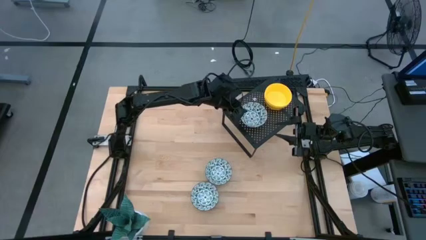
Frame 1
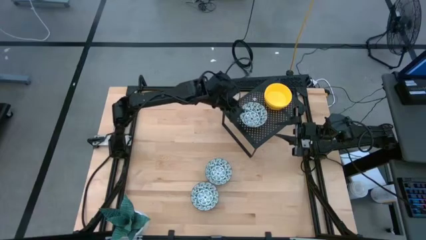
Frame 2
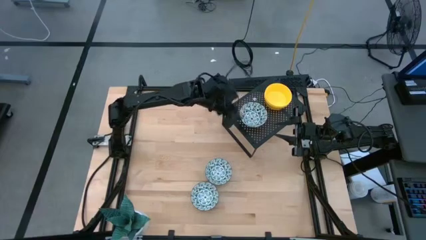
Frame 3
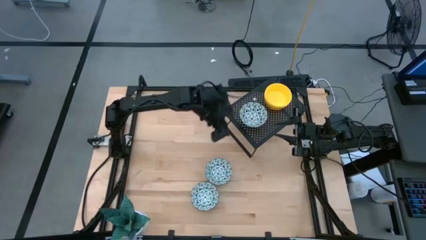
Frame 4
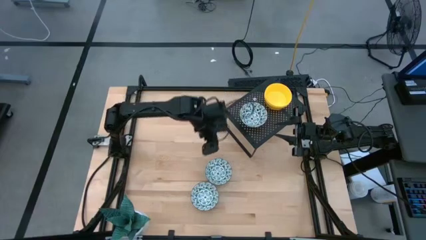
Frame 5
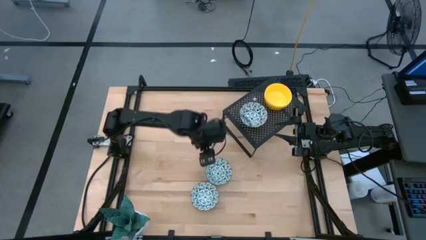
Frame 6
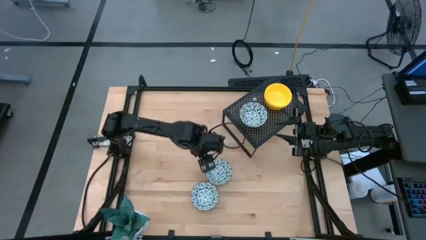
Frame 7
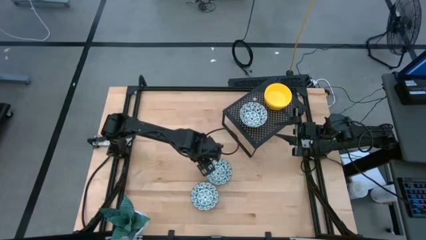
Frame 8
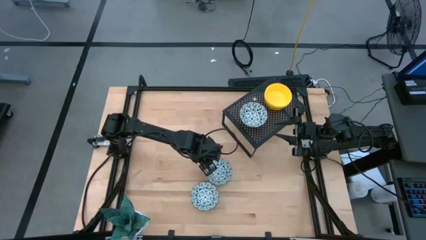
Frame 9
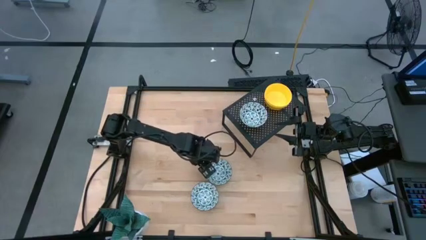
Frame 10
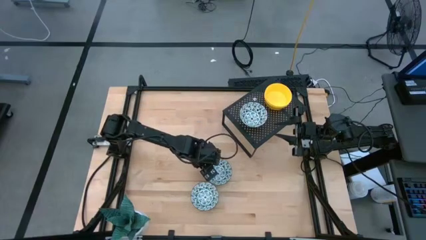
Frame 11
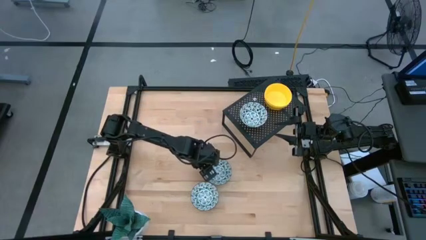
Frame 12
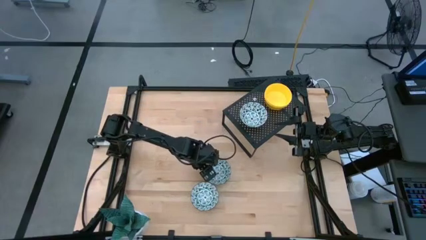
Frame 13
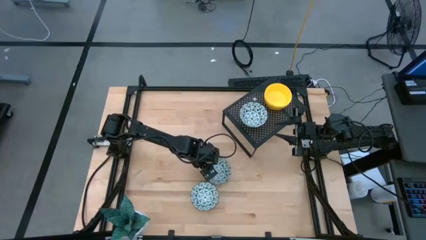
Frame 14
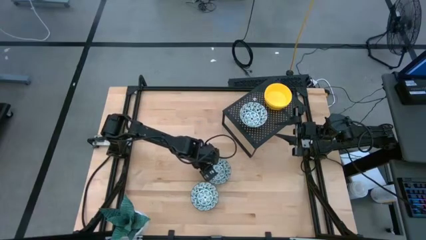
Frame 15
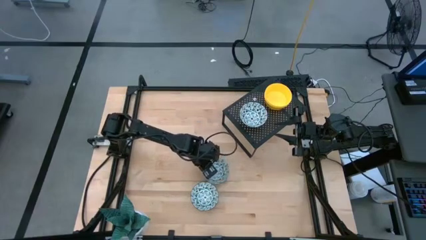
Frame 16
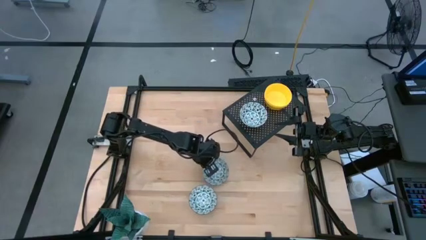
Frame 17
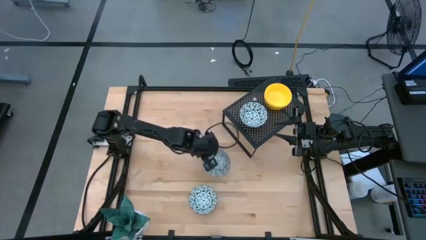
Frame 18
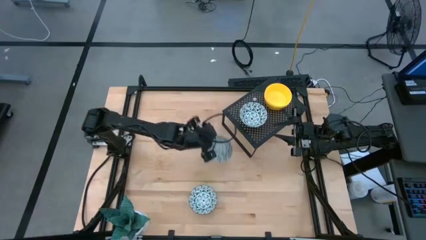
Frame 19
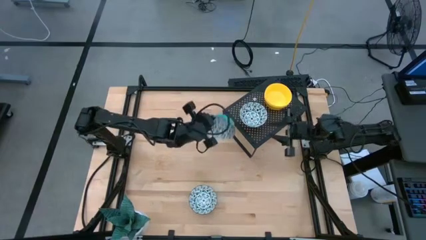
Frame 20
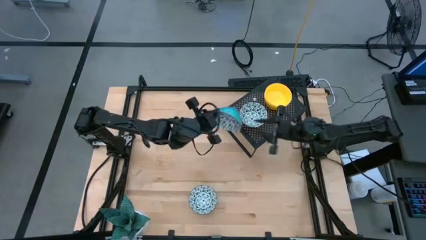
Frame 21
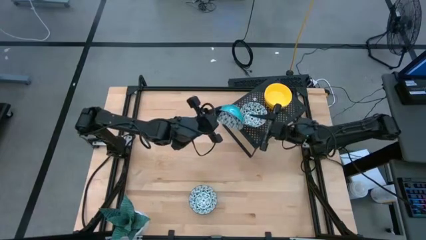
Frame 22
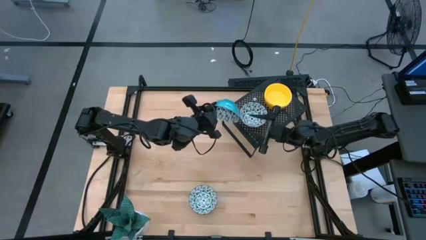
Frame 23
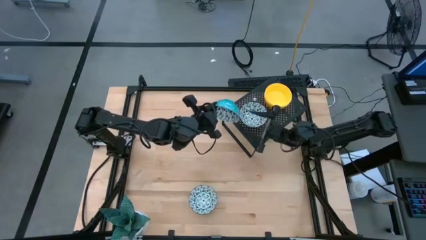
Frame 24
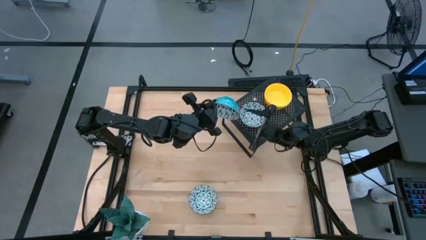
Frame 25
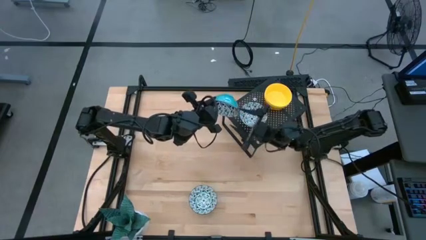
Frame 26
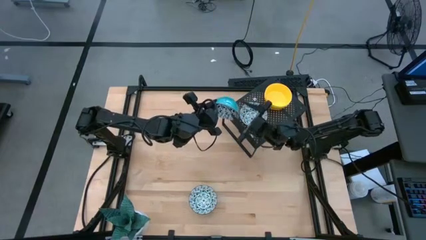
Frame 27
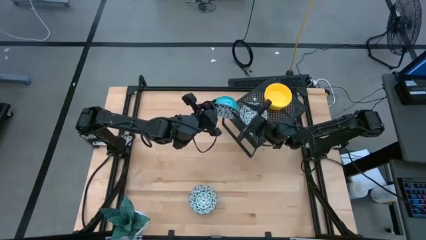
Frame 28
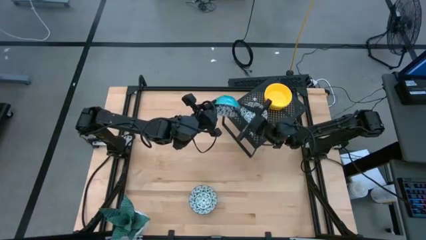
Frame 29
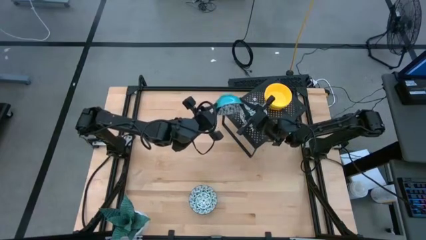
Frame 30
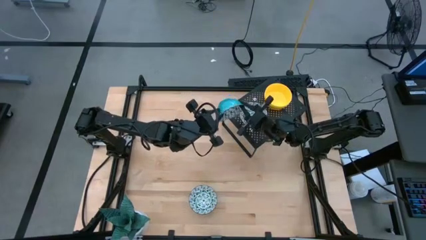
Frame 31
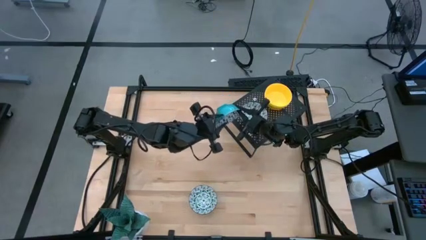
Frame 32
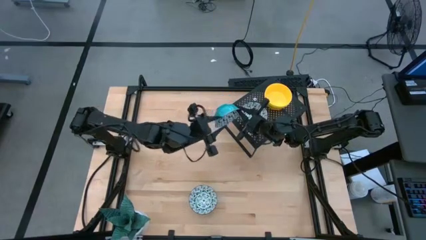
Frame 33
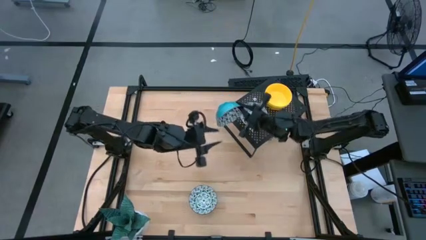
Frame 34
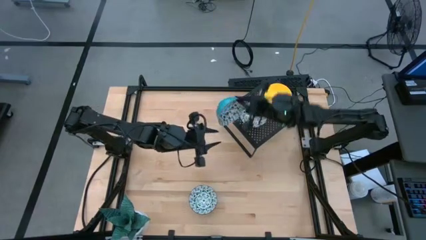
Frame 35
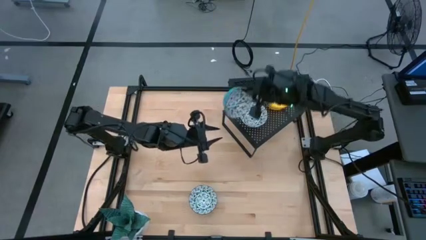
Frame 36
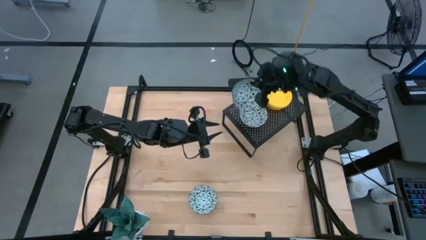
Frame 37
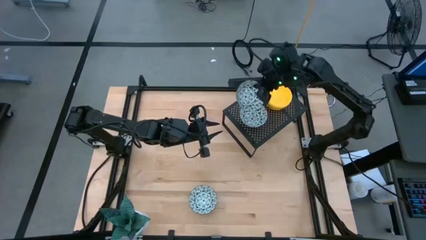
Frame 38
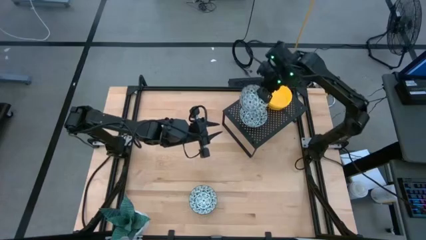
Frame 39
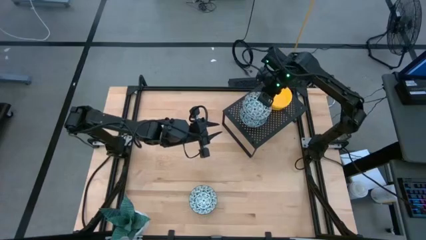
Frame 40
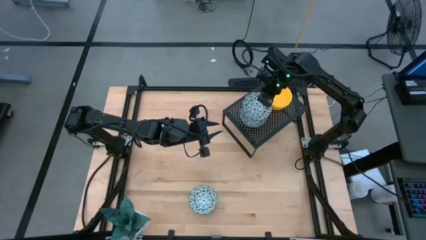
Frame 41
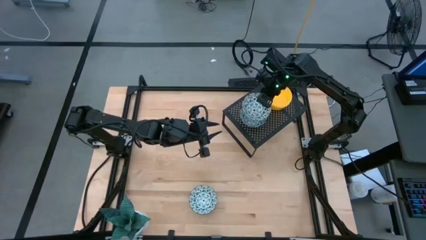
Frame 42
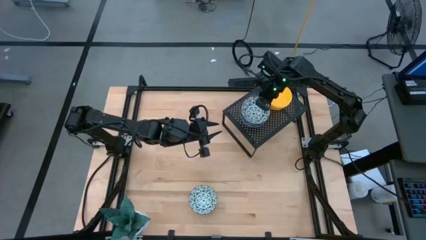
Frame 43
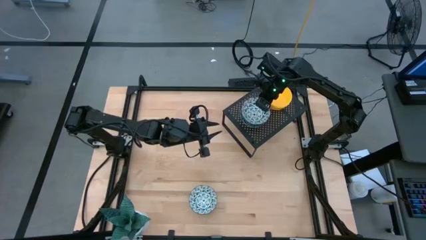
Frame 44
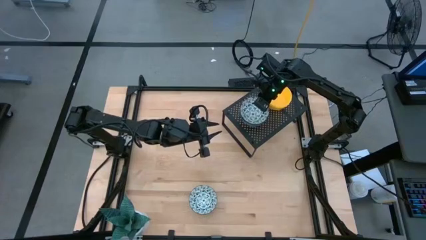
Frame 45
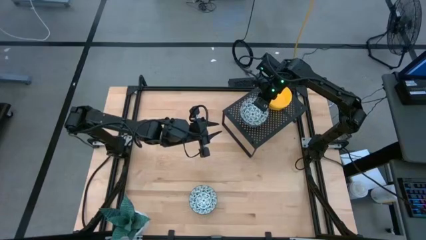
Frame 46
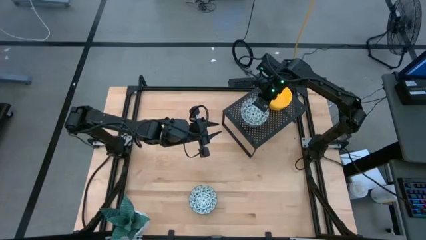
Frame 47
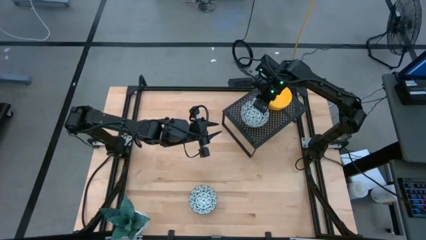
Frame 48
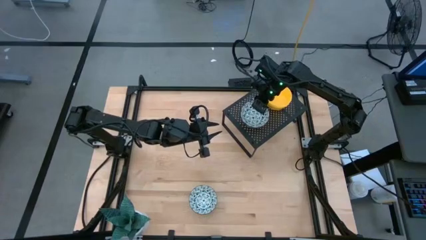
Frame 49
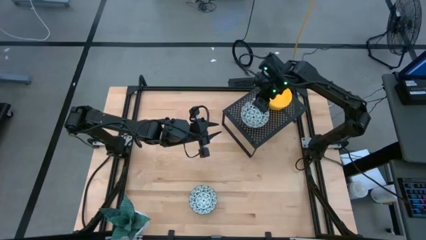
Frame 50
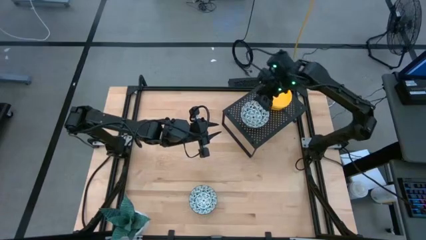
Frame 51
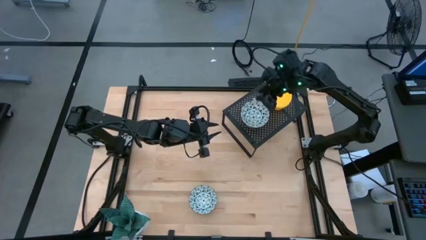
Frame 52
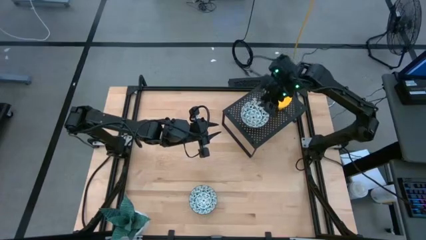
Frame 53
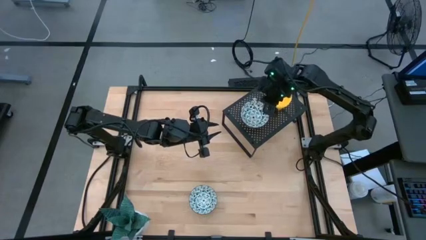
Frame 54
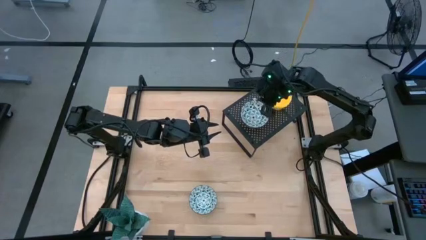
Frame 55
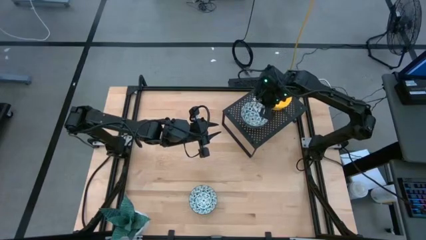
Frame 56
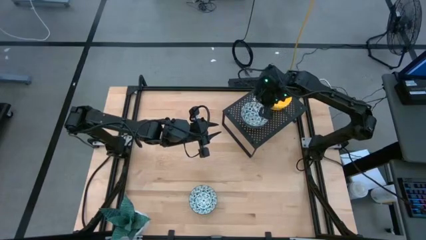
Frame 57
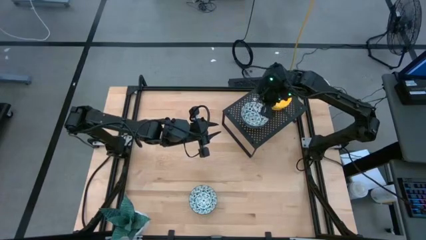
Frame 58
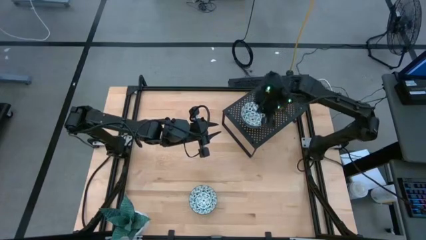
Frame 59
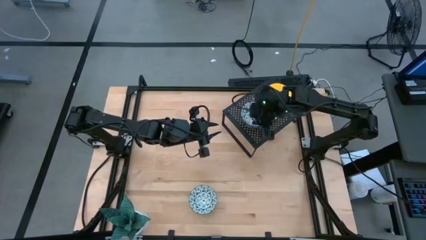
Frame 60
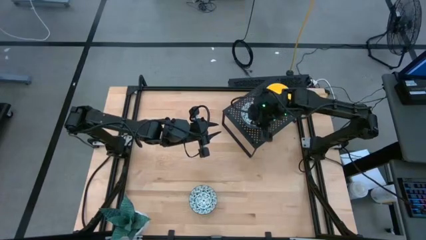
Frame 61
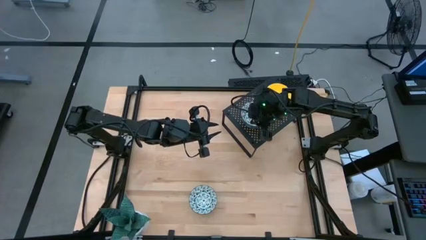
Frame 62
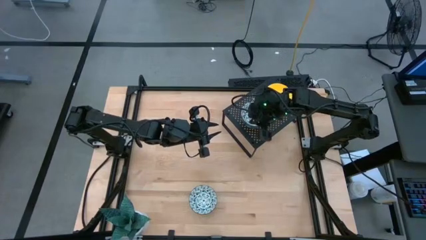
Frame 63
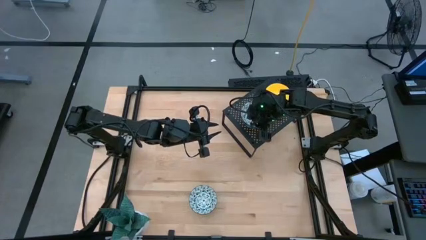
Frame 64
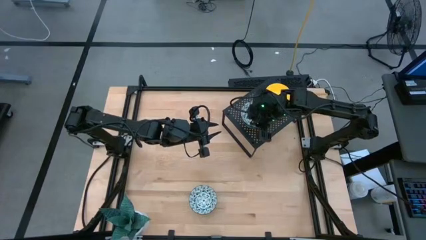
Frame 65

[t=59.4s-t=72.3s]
Task: Pick & Place Mini bowls
Stack the top blue patterned bowl on the blue patterned bowl on the shelf

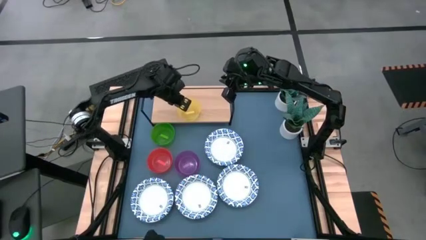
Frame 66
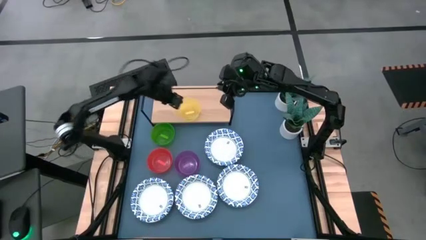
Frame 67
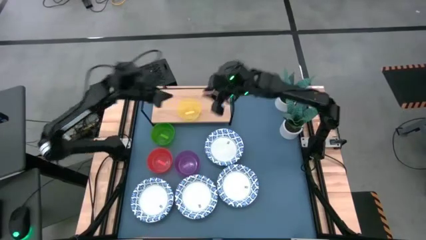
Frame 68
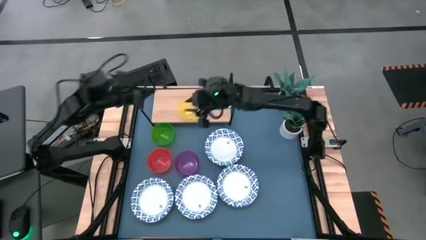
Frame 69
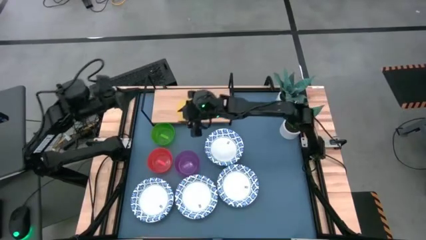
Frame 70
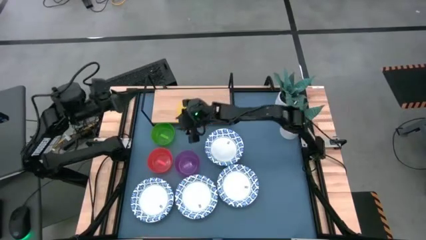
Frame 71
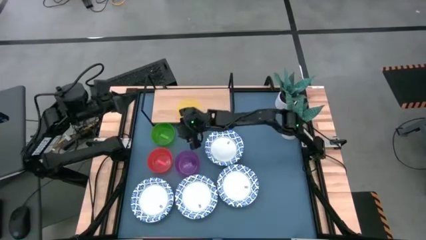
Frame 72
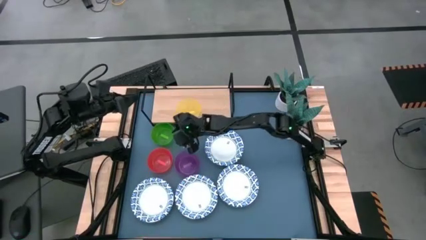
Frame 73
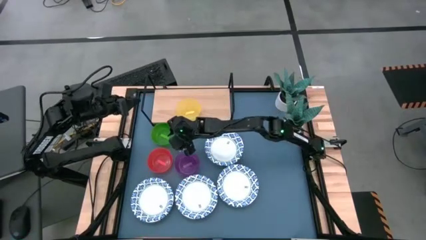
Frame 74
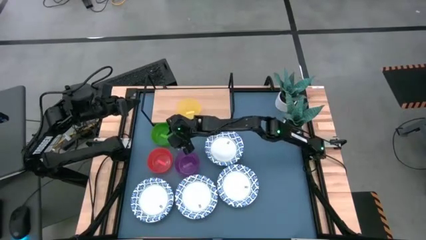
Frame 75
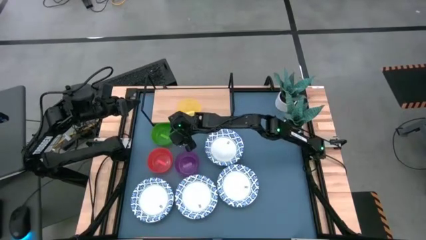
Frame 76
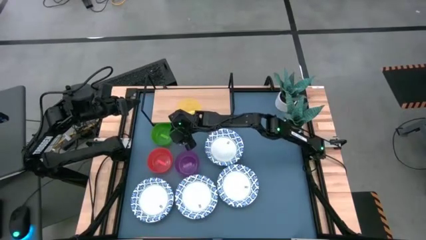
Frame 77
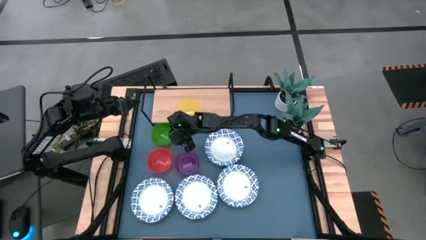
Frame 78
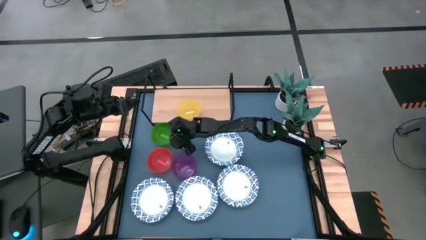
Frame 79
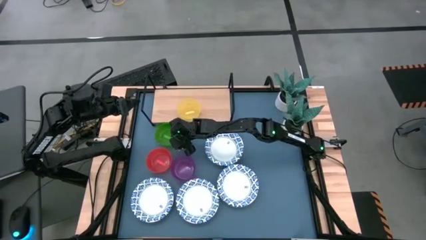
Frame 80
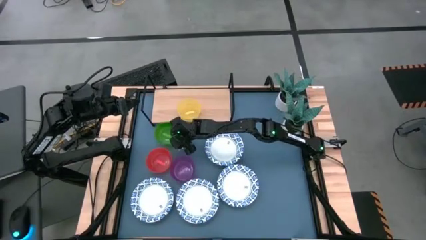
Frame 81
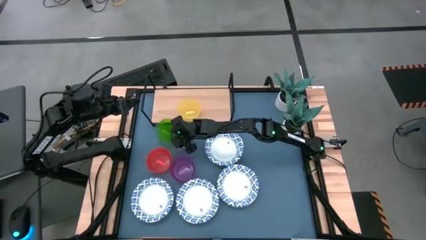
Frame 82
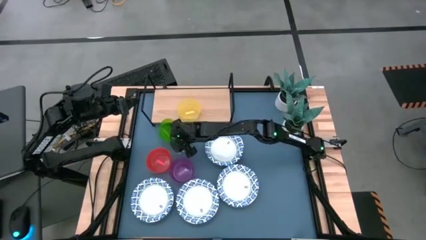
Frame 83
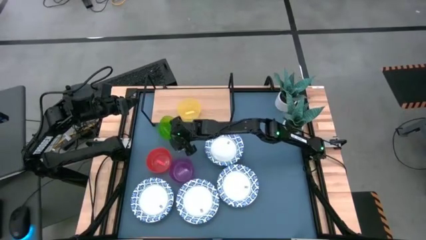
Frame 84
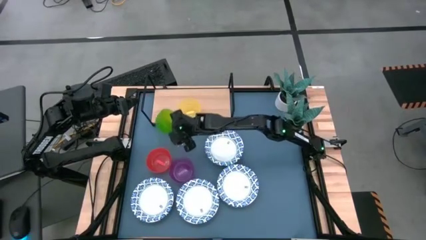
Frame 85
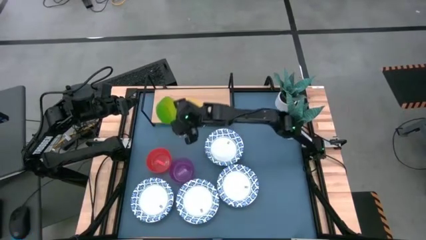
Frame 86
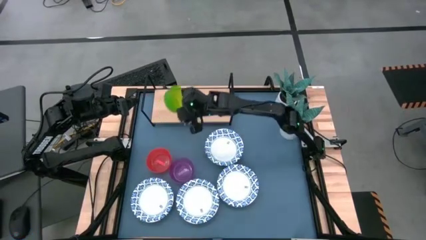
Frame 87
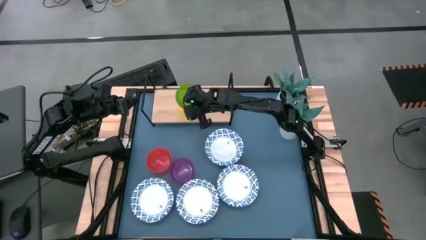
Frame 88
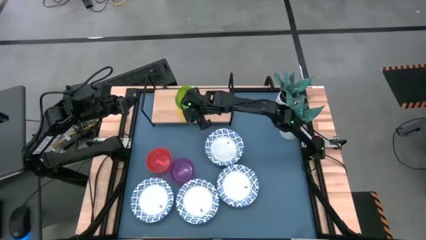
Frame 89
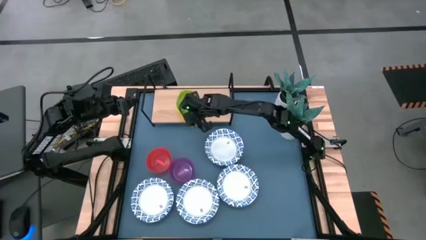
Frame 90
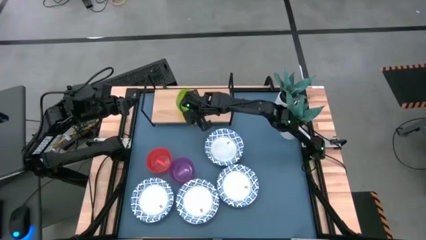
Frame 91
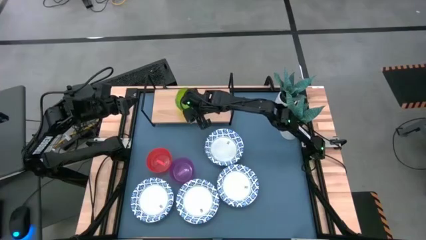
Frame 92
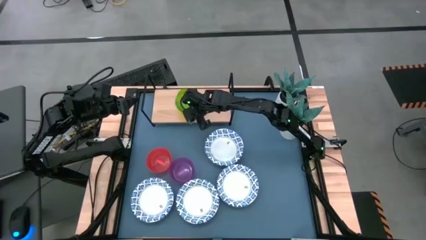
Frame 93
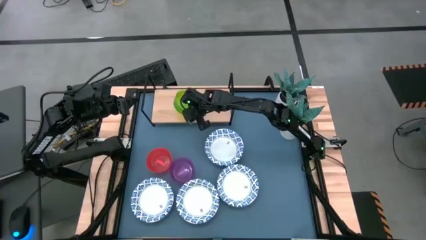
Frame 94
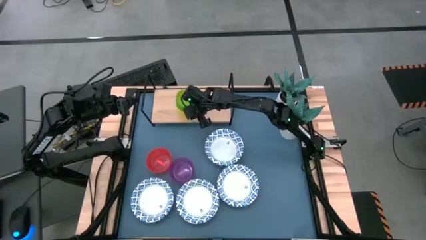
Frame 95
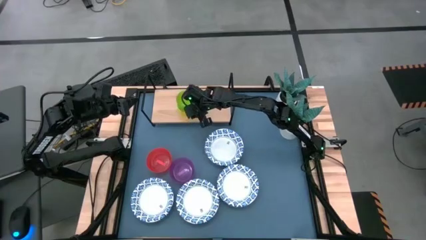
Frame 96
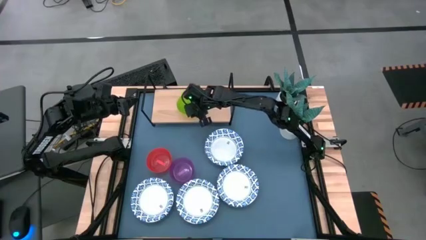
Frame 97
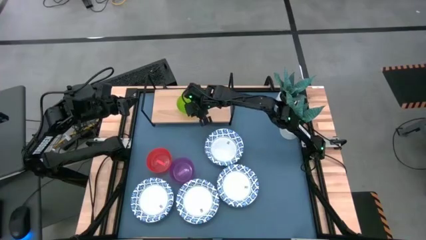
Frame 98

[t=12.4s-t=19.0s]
Task: Place and stack bowls onto a shelf
Stack the green bowl on top of the yellow bowl on the shelf
